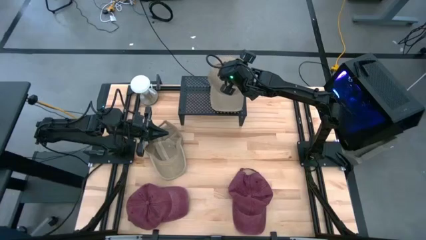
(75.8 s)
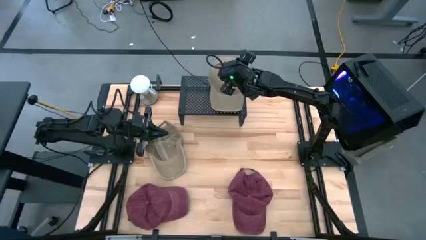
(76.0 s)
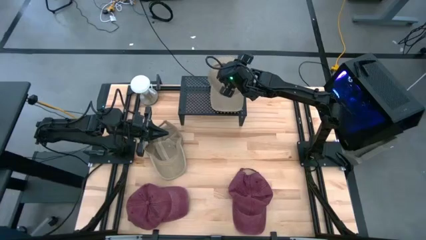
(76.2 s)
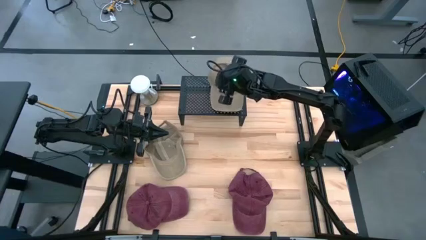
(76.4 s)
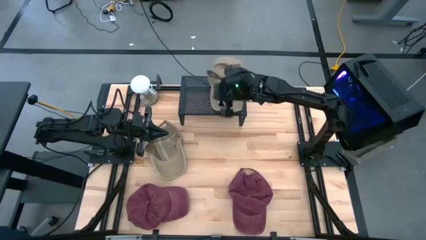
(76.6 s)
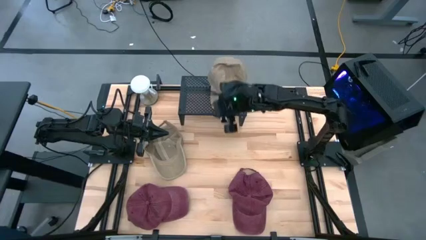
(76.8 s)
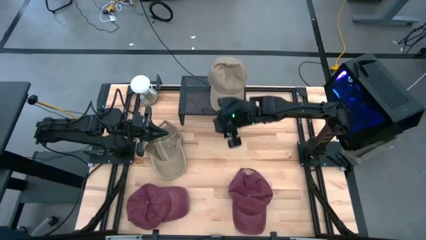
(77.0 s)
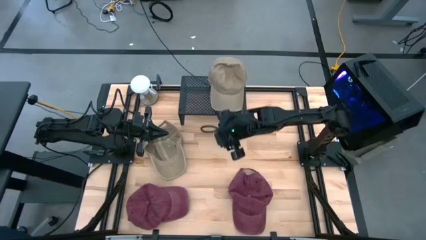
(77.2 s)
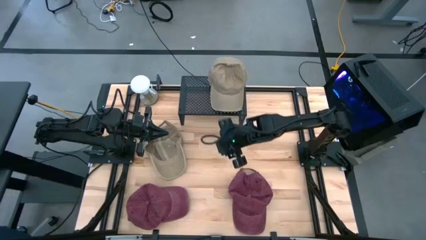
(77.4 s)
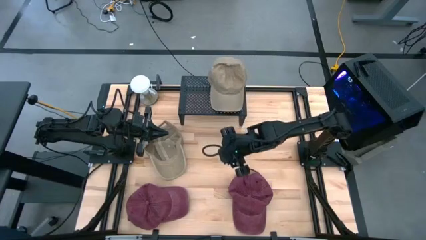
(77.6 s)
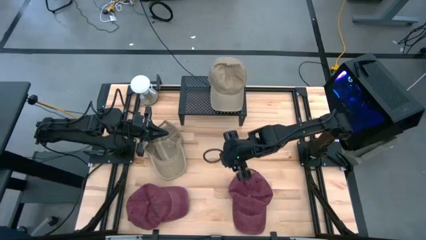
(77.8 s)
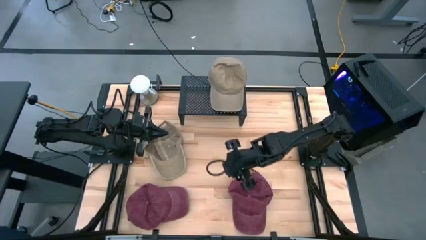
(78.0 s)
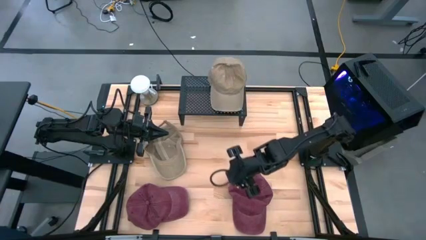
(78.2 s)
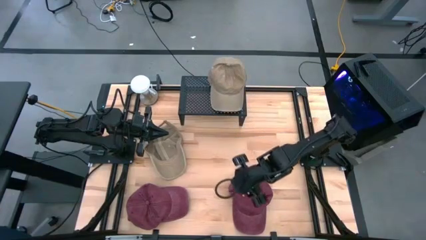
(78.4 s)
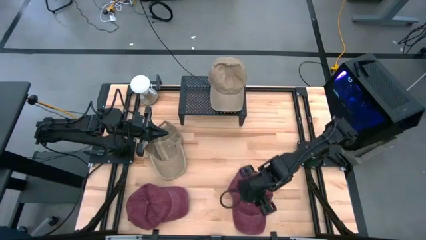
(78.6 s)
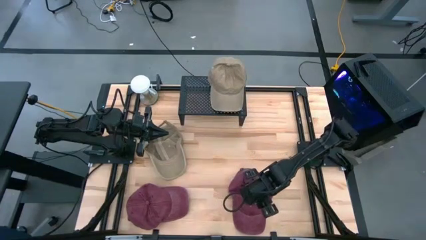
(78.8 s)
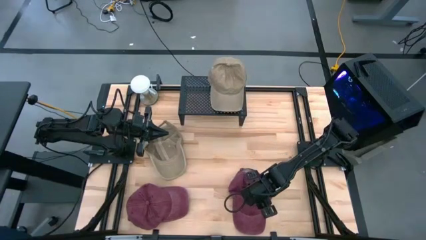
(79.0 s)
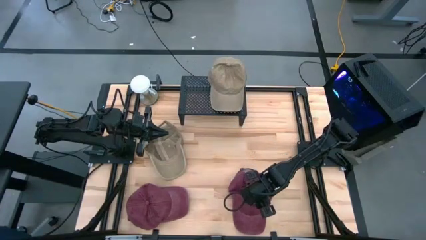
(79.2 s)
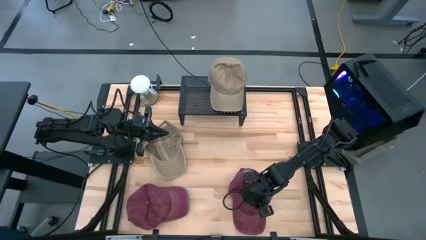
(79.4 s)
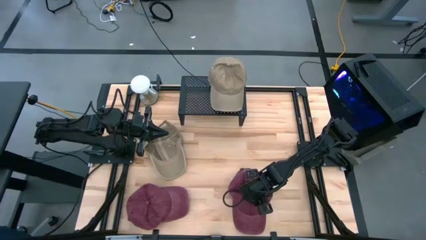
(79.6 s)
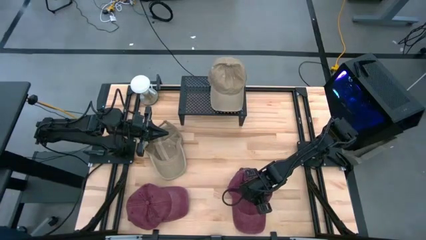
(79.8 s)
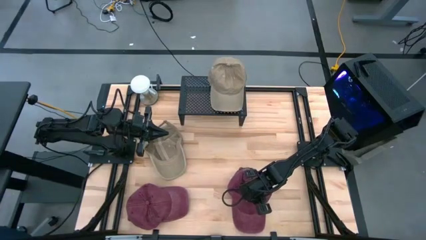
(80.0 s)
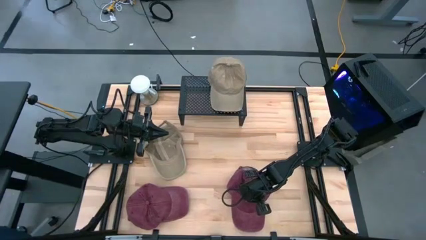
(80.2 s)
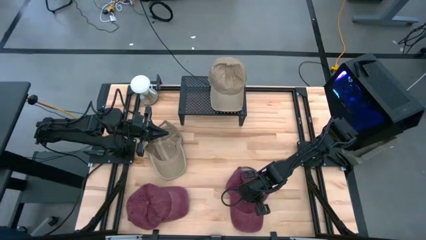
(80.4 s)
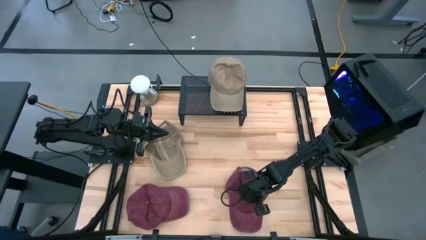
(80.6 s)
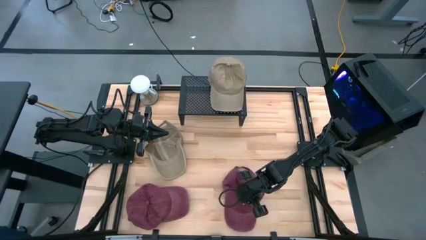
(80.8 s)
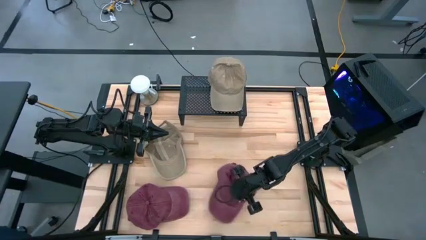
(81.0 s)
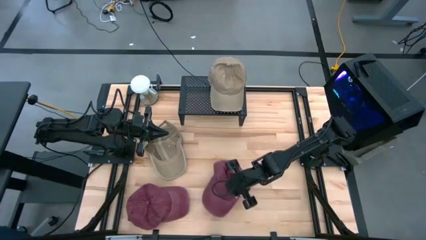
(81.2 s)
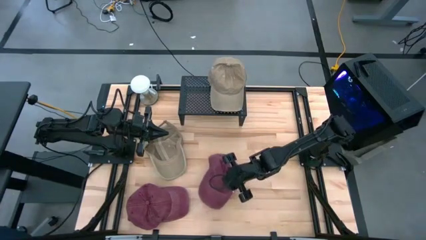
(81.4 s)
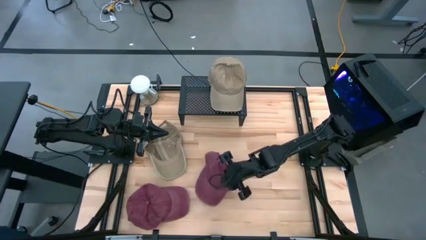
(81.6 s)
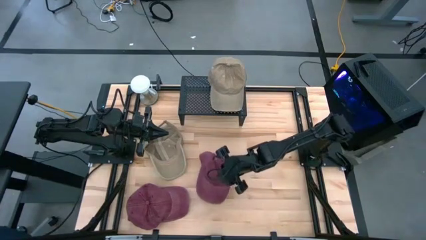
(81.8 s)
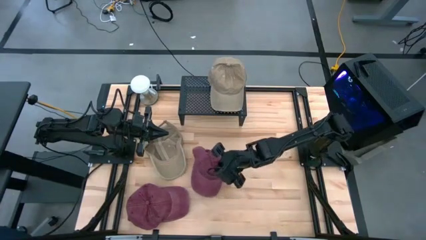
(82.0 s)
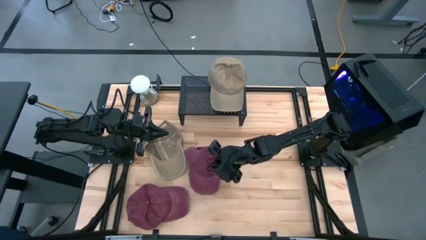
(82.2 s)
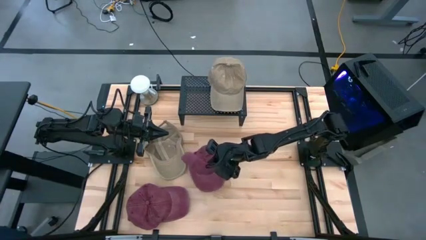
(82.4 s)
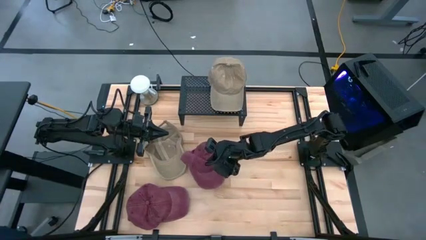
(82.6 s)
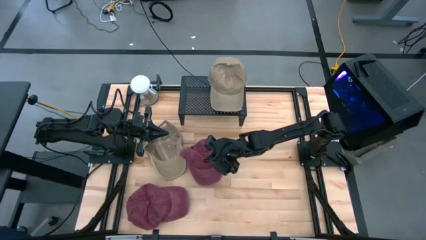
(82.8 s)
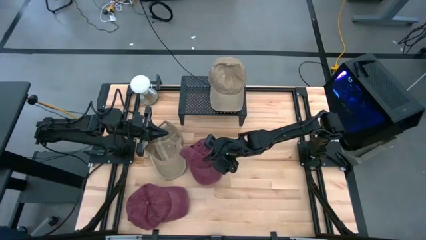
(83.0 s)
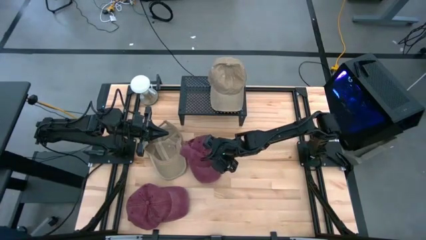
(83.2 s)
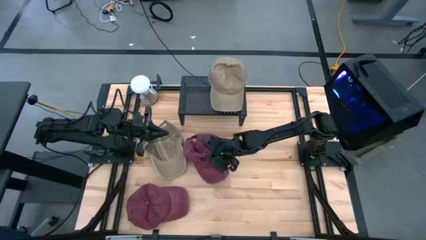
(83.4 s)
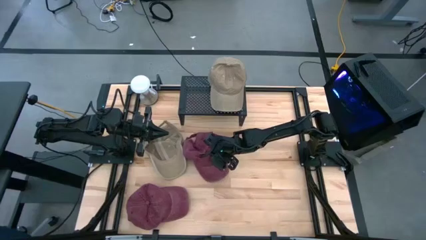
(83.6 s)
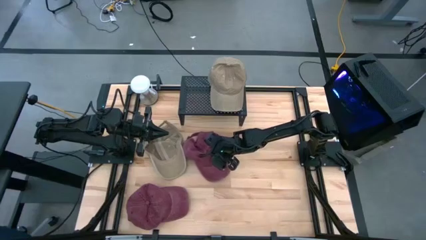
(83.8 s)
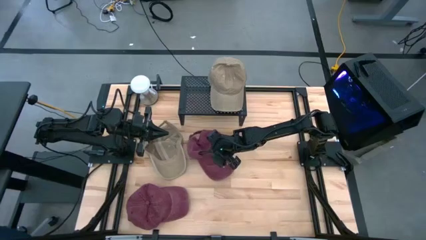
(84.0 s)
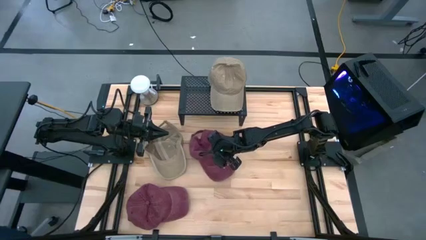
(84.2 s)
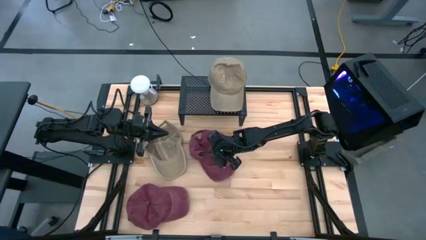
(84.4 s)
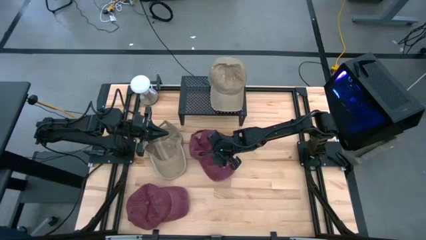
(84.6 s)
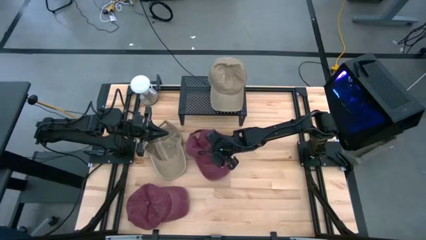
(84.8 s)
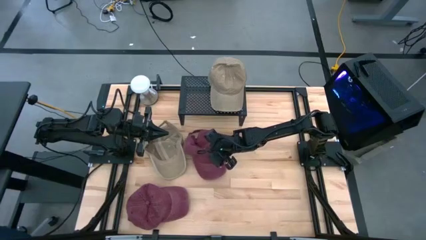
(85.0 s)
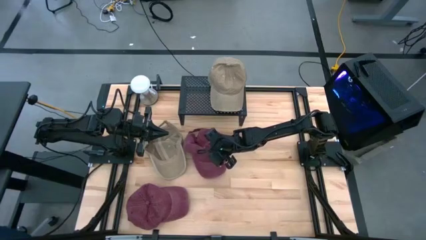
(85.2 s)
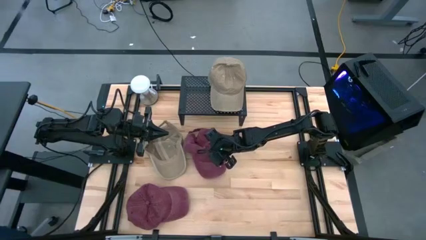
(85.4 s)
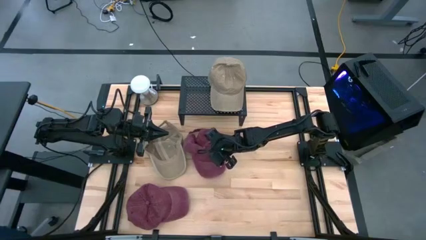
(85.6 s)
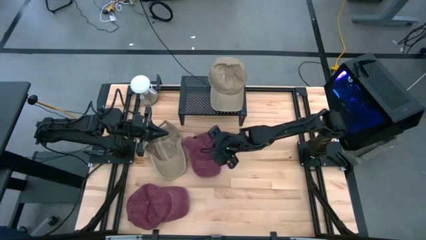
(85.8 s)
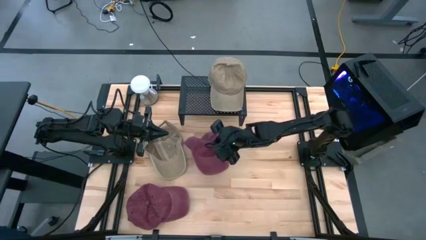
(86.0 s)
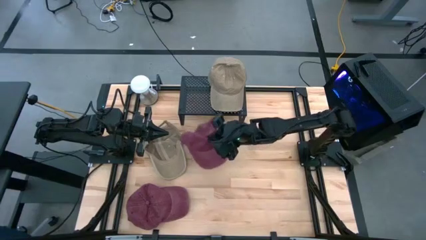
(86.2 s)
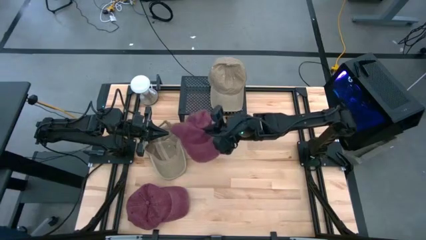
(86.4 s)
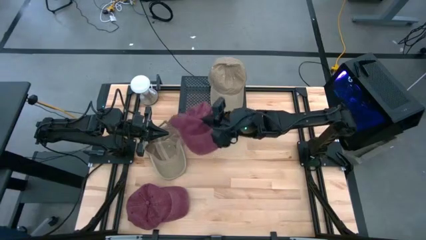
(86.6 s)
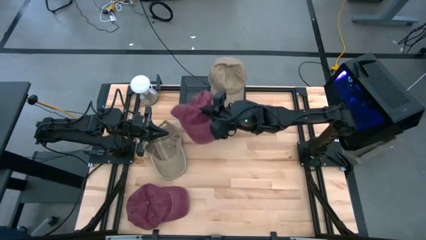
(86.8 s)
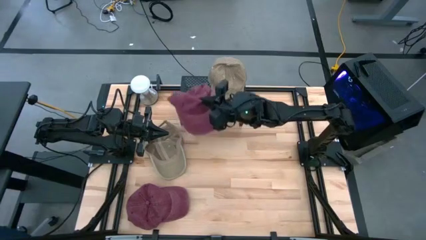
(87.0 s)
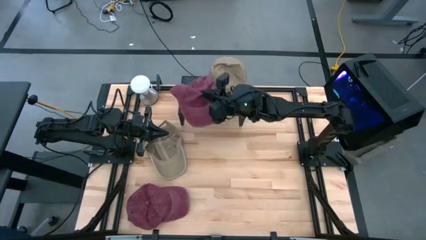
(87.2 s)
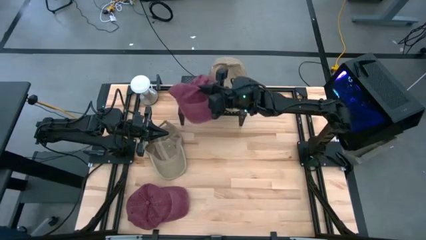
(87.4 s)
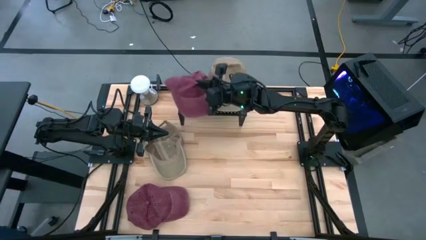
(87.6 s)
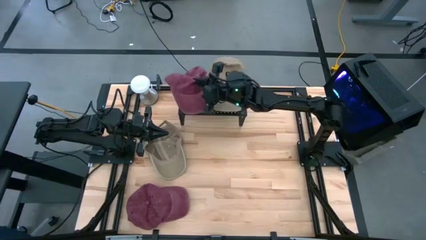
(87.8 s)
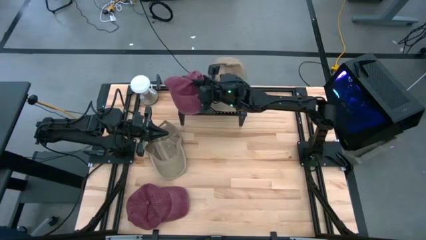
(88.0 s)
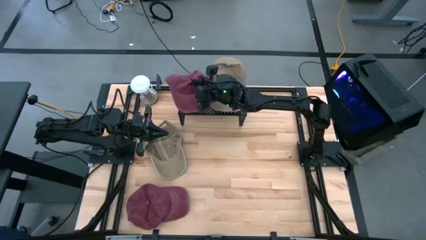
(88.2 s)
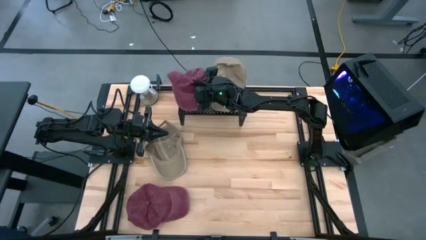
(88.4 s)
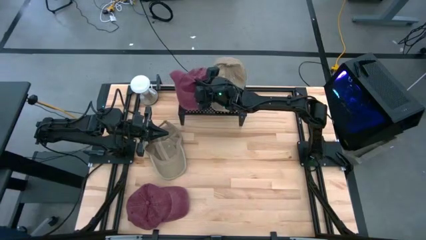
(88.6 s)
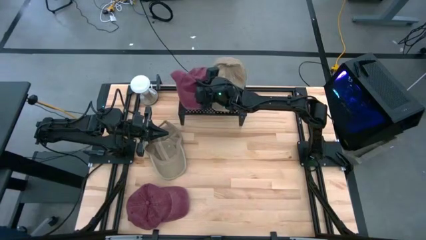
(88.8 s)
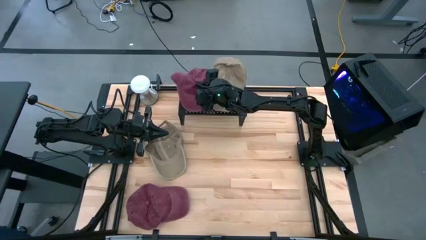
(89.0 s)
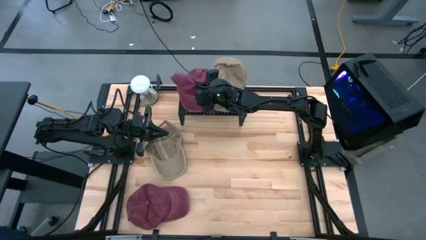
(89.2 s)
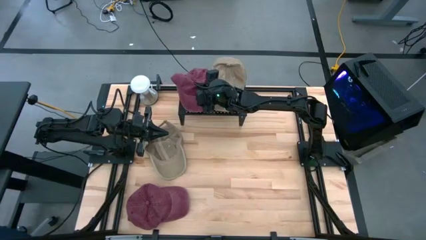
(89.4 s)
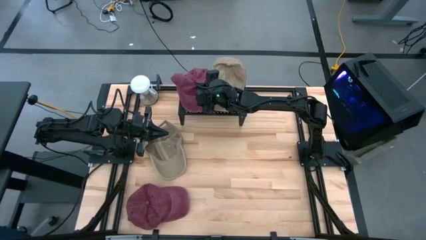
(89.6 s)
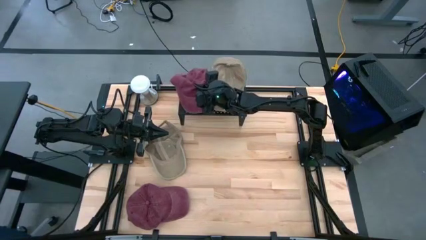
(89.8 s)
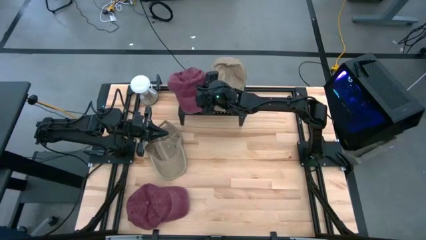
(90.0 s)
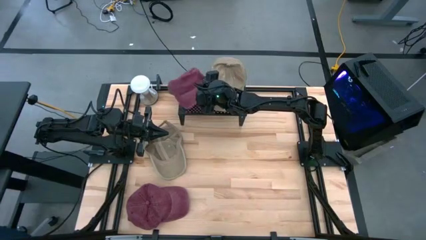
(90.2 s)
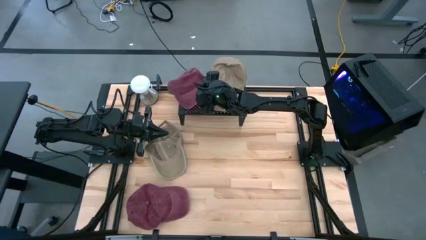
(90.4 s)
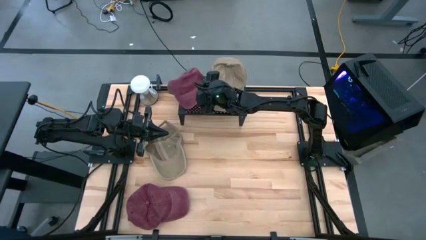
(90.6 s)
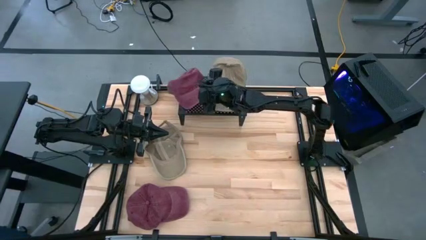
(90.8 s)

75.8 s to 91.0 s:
Task: Pick & Place hat
Put the right red cap on the shelf
